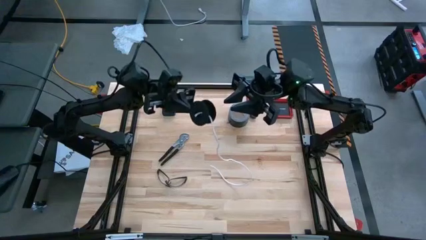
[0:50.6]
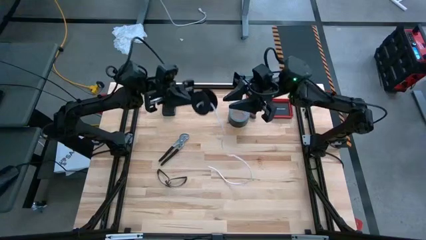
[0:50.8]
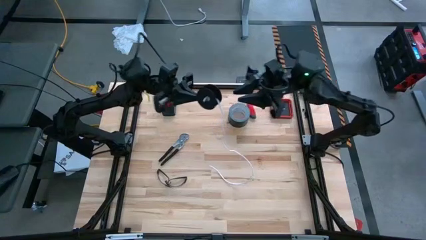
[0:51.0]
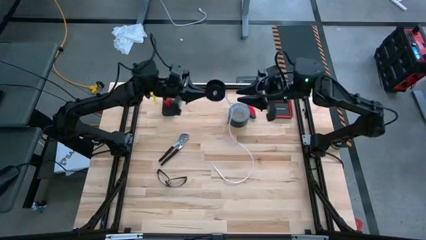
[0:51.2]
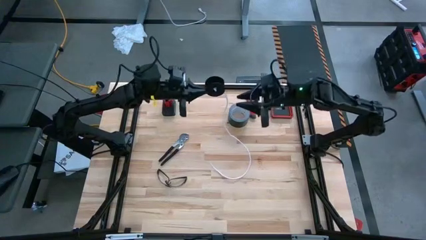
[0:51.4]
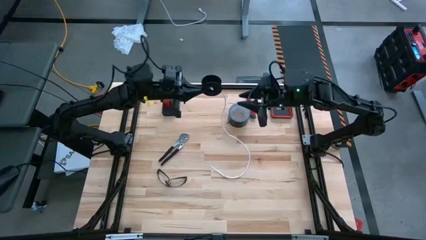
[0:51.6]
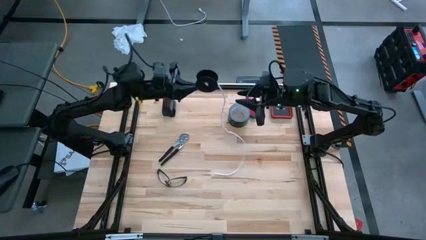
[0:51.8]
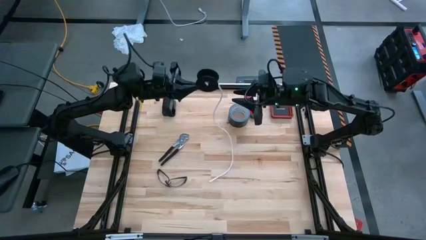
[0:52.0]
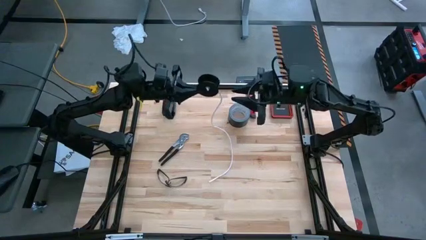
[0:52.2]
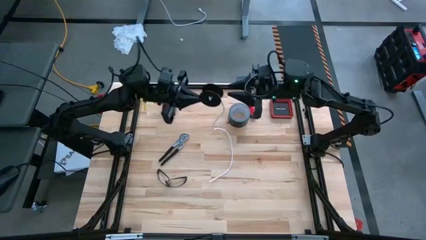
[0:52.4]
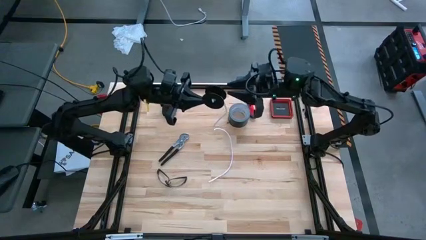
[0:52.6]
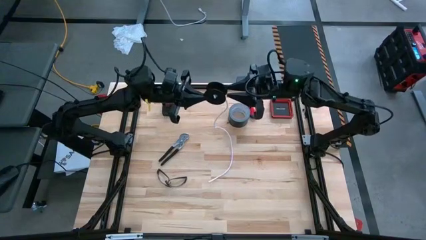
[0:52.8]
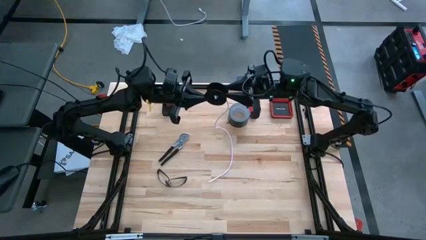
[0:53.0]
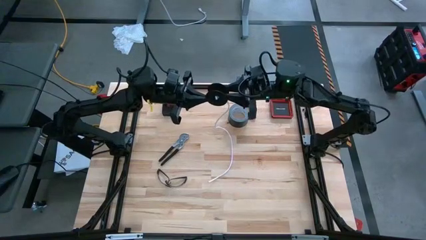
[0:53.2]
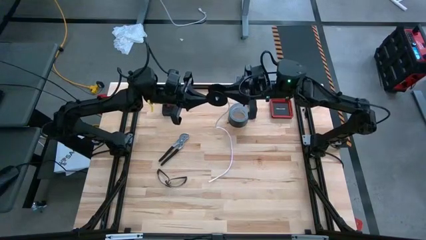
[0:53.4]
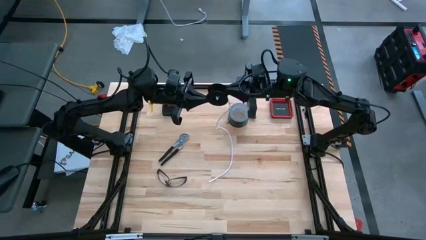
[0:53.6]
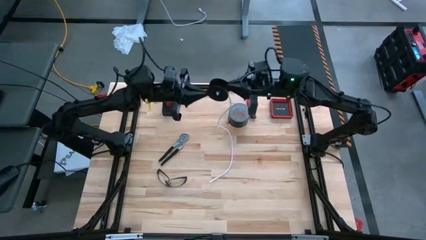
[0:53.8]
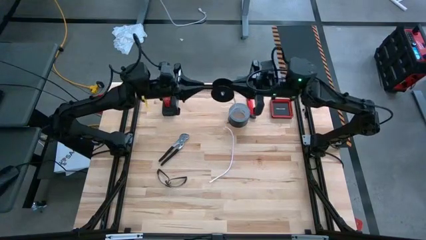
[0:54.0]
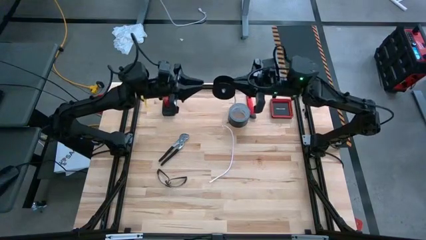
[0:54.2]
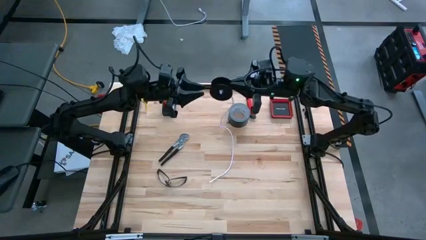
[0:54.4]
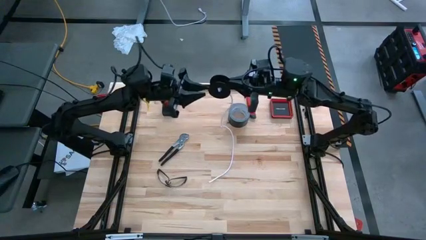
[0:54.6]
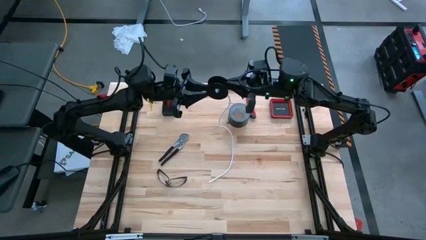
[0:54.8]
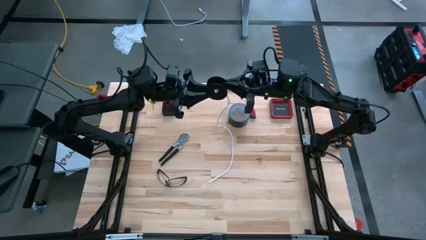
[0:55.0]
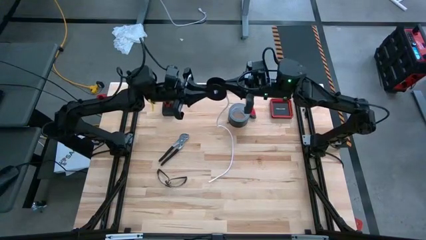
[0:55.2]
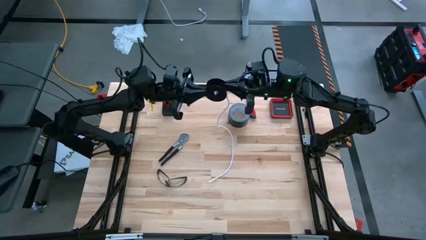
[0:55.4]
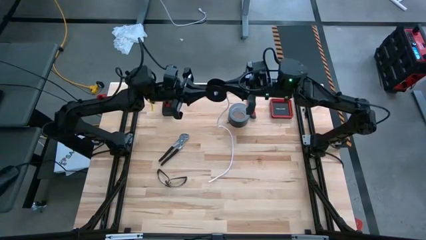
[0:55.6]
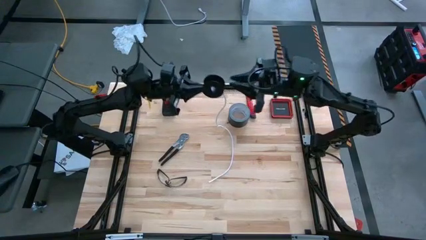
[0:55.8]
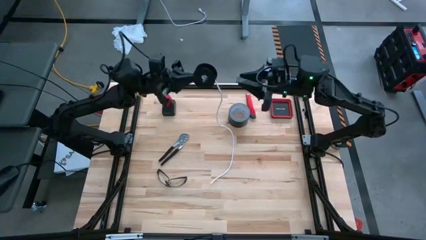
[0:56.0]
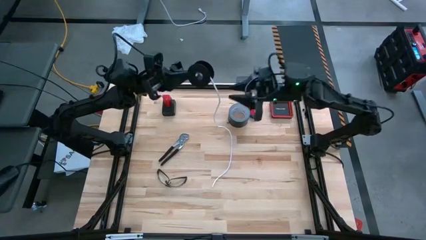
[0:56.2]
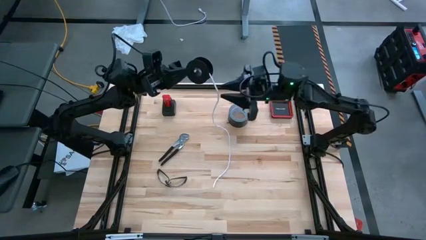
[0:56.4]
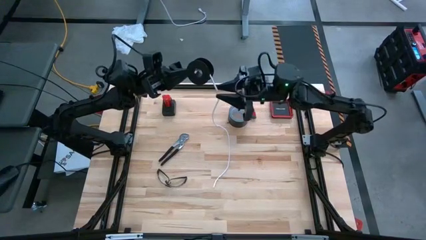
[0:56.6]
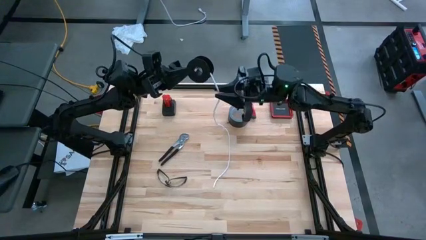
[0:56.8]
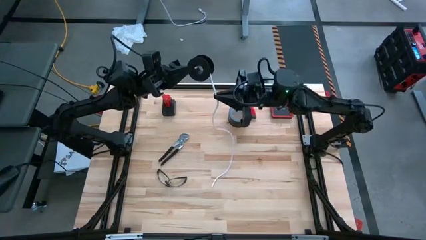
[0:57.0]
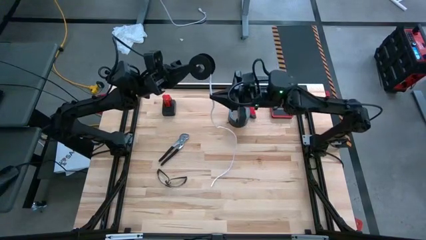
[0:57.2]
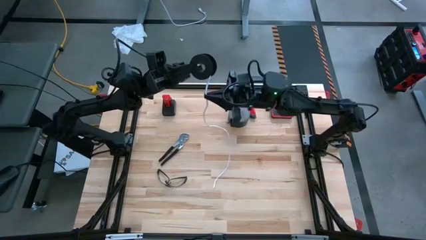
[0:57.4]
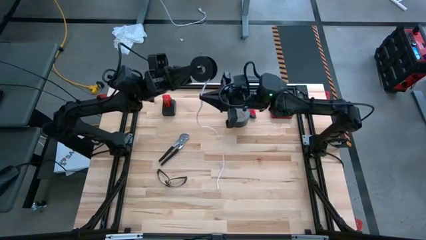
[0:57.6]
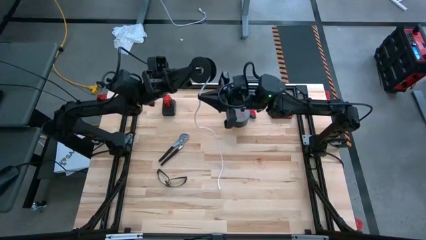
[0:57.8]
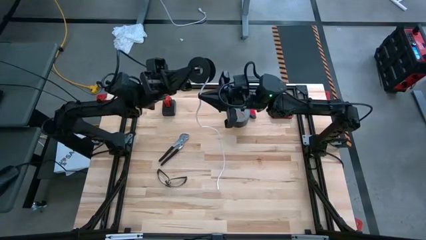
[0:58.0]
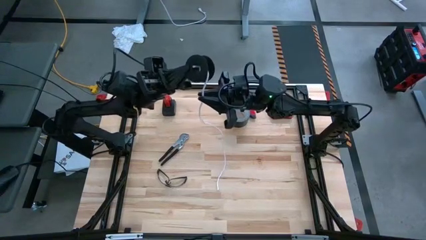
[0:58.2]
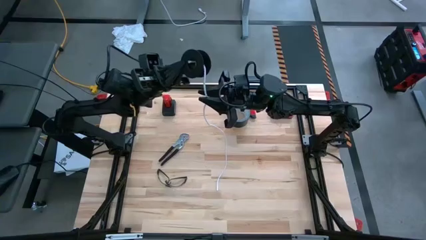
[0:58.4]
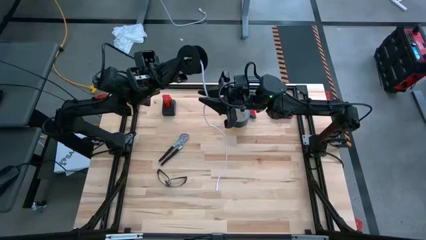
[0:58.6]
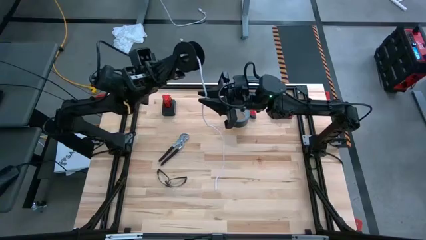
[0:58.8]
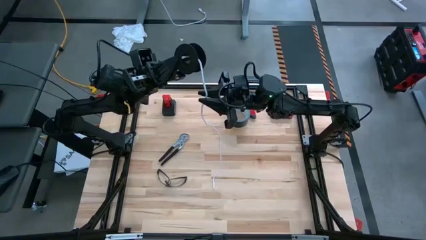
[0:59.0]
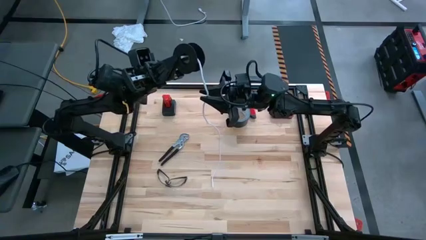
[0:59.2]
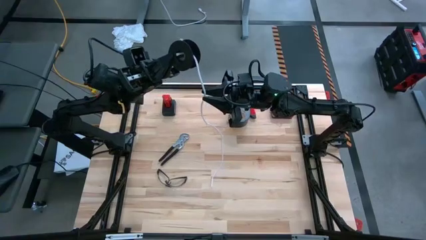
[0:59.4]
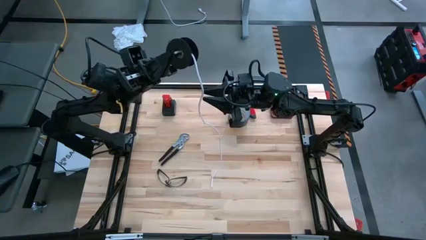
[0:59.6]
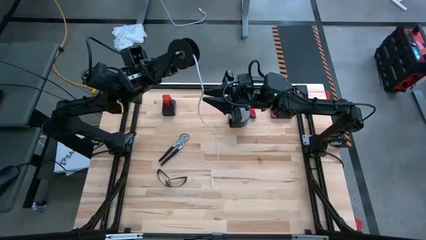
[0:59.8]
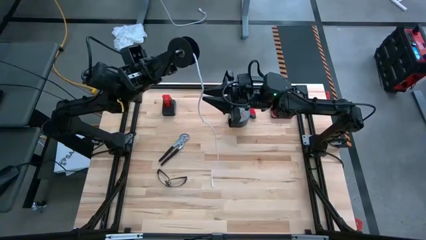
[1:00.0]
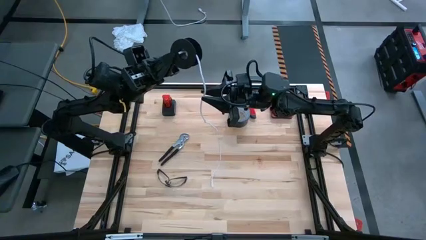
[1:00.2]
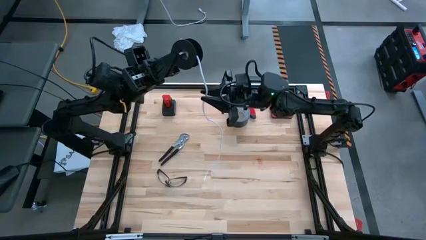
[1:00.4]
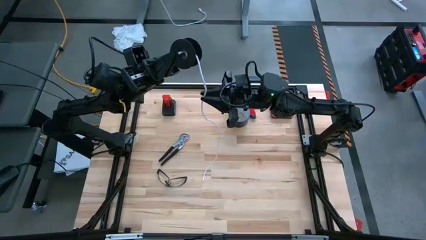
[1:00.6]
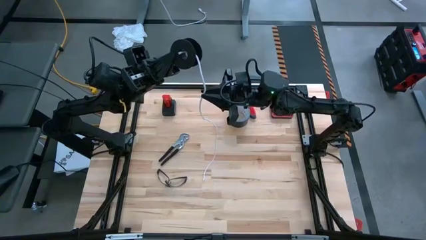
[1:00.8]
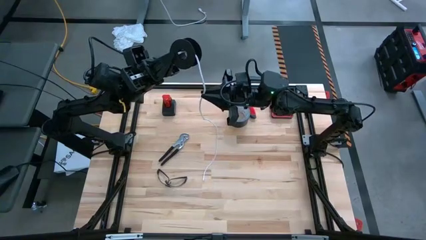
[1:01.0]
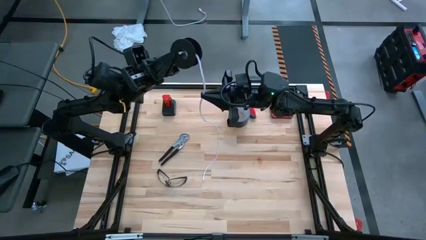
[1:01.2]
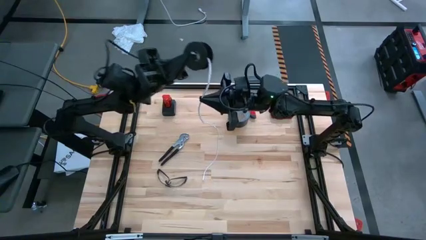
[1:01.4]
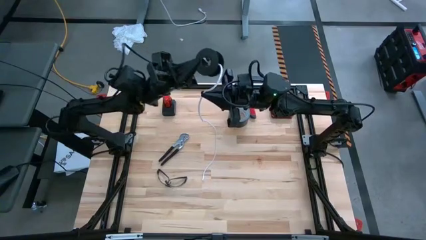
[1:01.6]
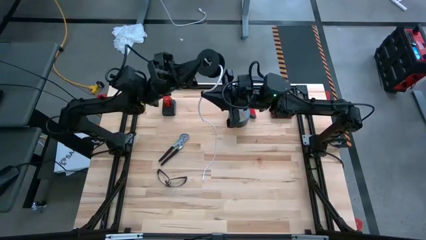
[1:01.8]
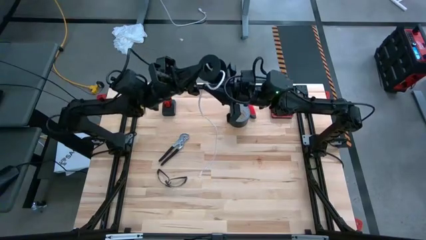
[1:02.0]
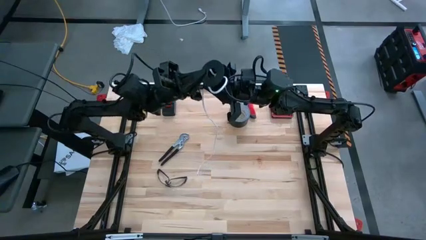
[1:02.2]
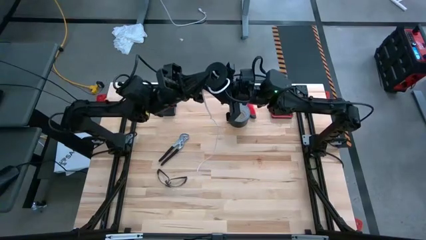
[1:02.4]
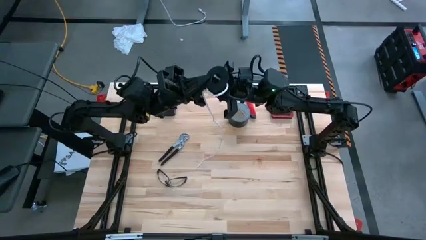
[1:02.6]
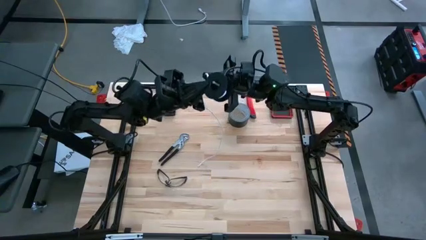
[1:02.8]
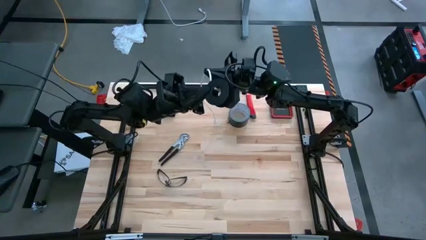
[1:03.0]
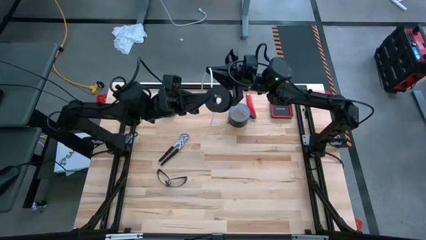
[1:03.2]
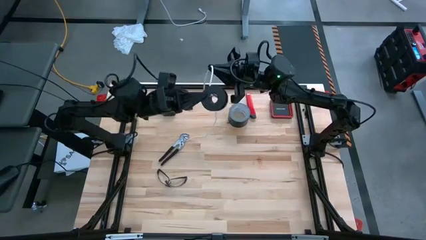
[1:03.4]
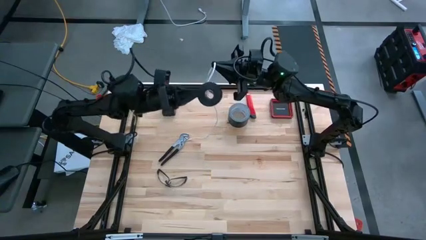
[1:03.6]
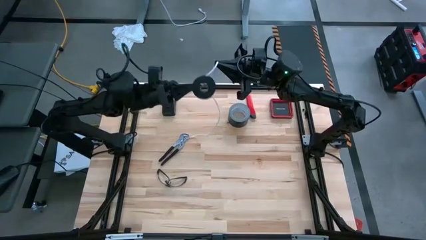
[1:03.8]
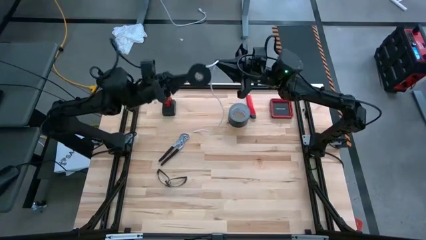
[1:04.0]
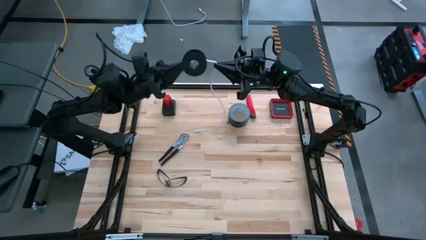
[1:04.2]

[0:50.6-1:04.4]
Task: Coil cords
Coil the white wire onto the black spool

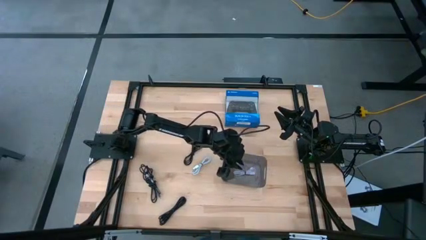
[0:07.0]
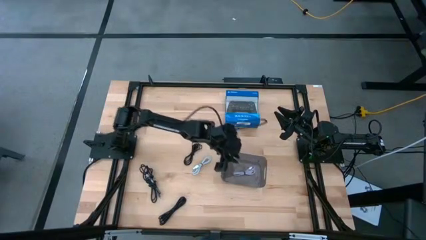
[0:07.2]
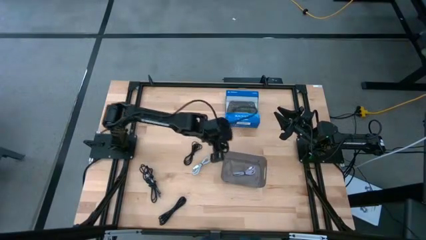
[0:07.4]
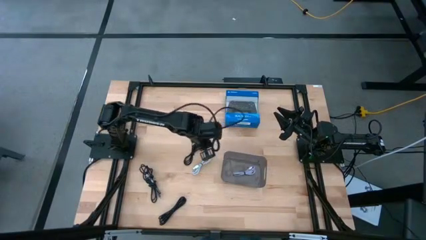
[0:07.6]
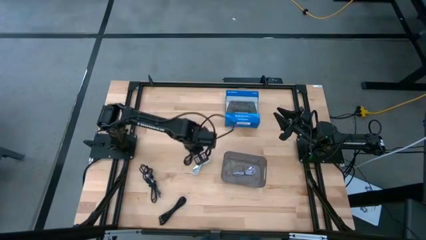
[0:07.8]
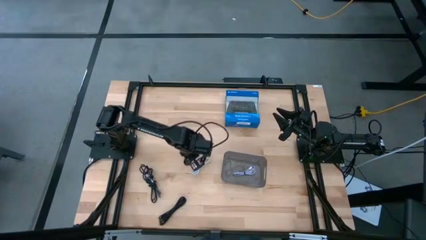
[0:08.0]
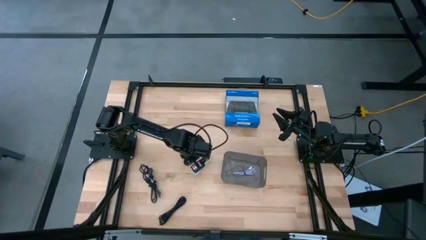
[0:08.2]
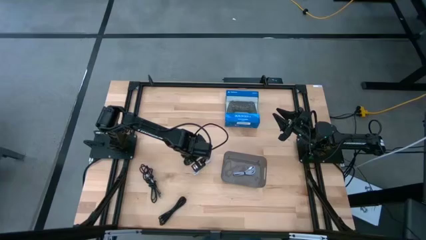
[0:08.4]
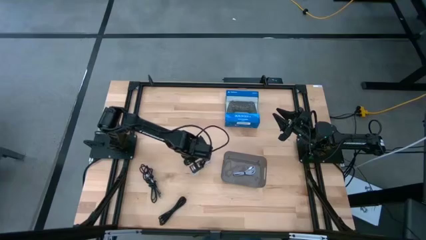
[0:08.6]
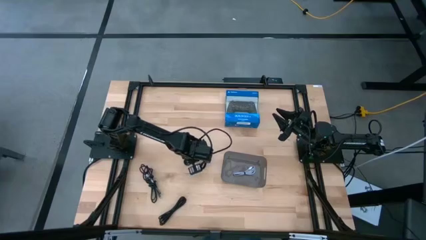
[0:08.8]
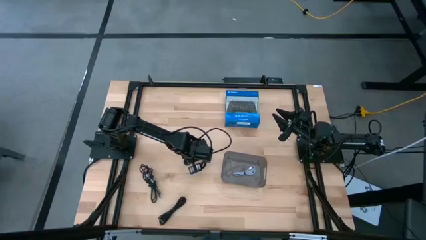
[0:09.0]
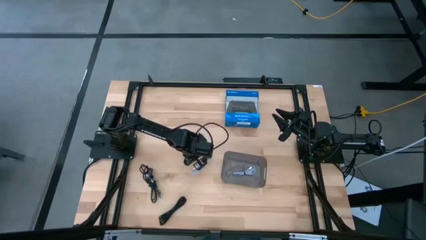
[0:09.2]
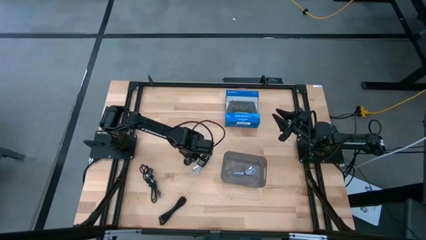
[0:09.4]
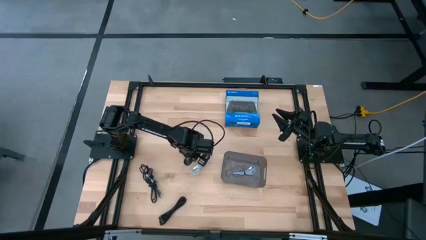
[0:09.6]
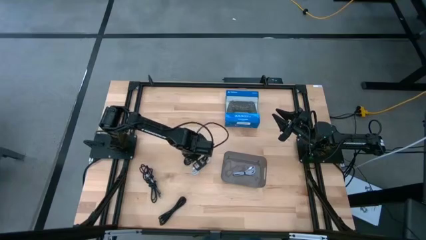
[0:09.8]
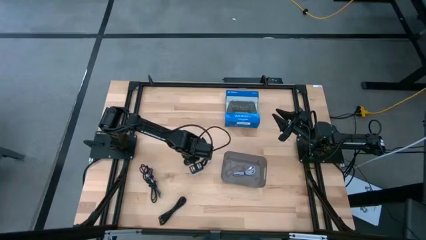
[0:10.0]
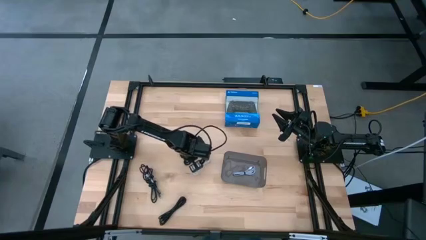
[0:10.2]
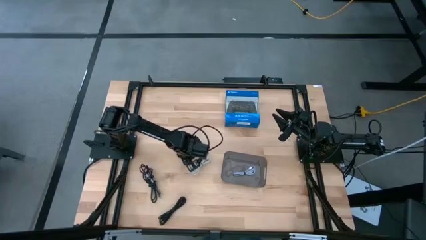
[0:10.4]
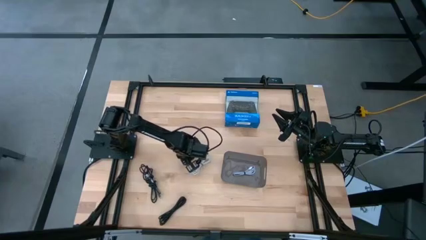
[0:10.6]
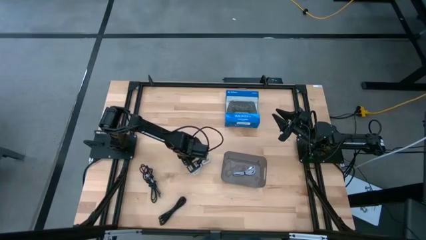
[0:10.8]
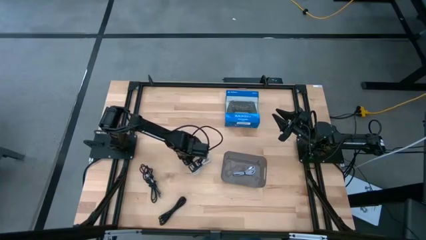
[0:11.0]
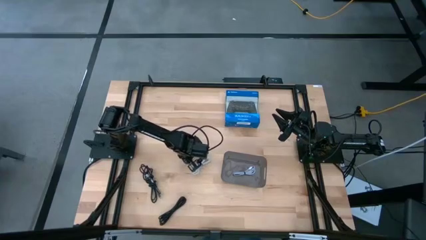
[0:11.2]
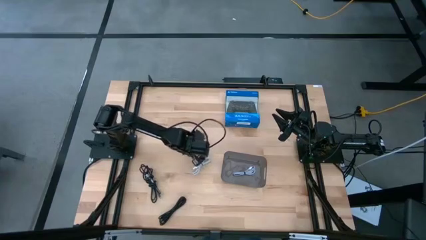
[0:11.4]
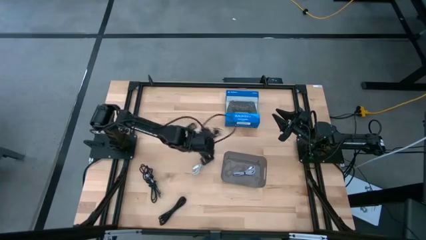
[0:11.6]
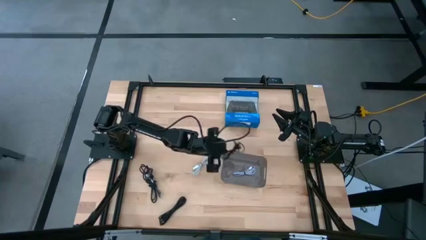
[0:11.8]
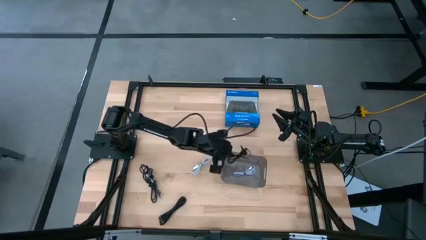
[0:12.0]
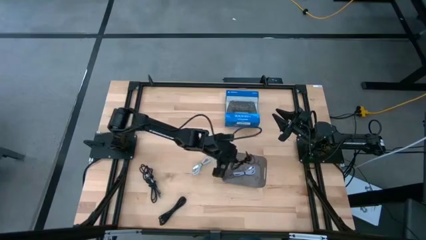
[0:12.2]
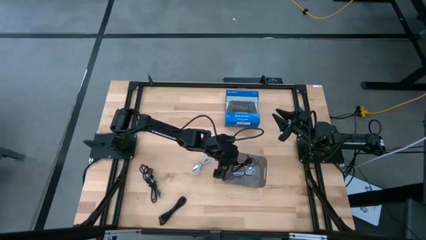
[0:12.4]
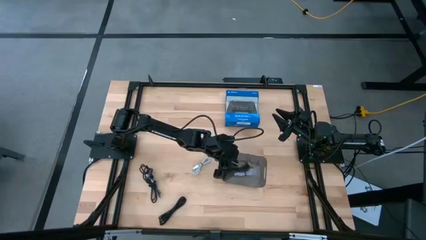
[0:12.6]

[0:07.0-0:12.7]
Task: Pick and place USB-C Cables
Put the top black charger cable into the black bin
